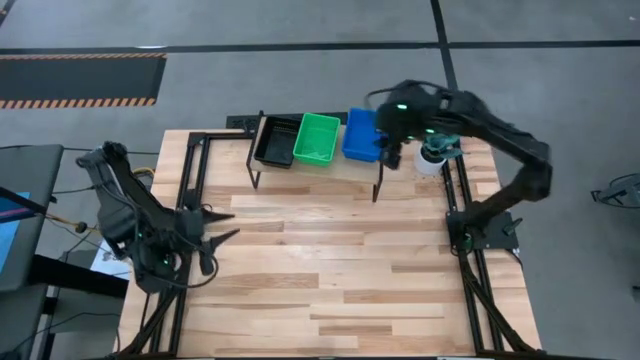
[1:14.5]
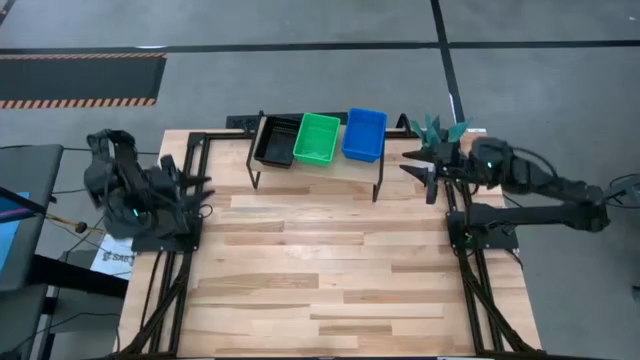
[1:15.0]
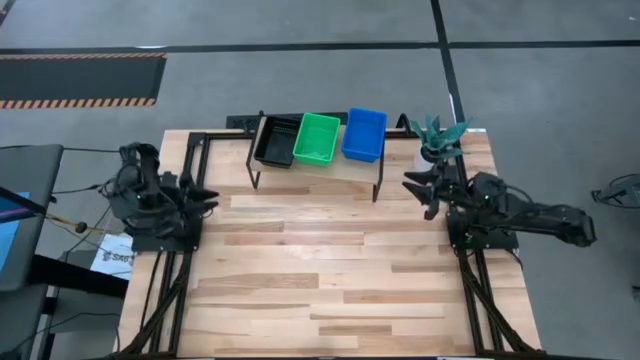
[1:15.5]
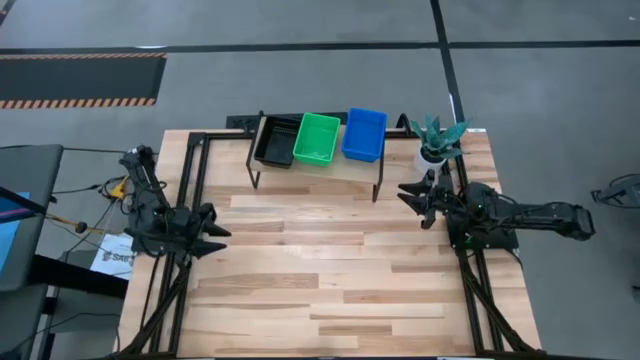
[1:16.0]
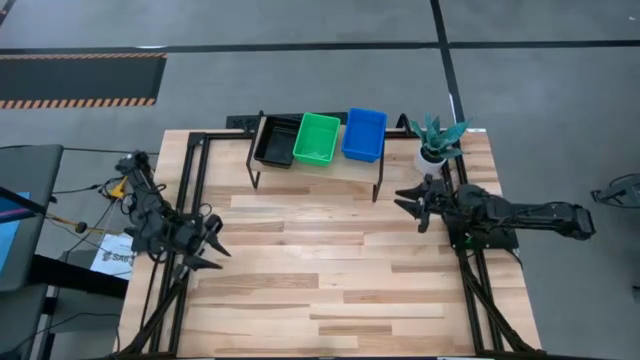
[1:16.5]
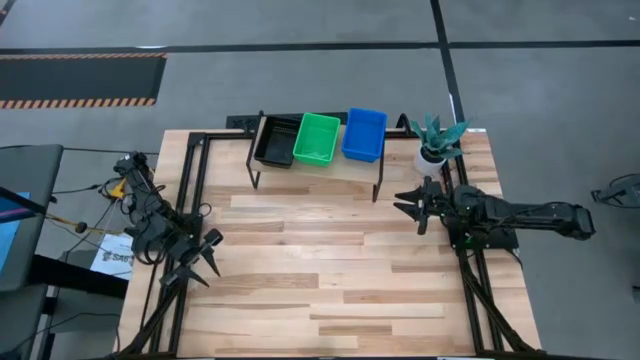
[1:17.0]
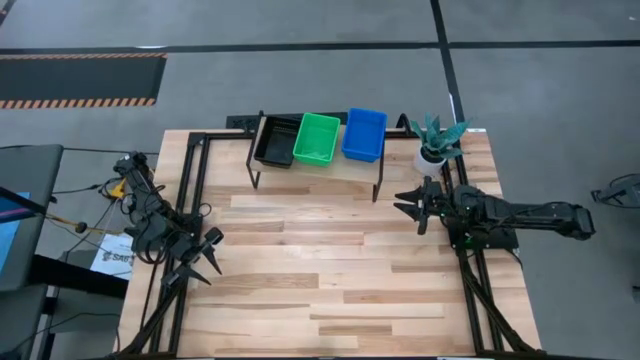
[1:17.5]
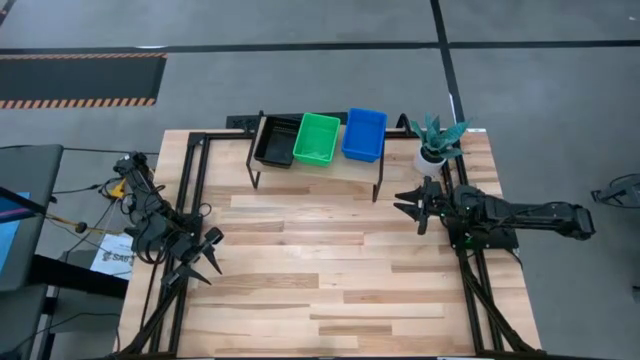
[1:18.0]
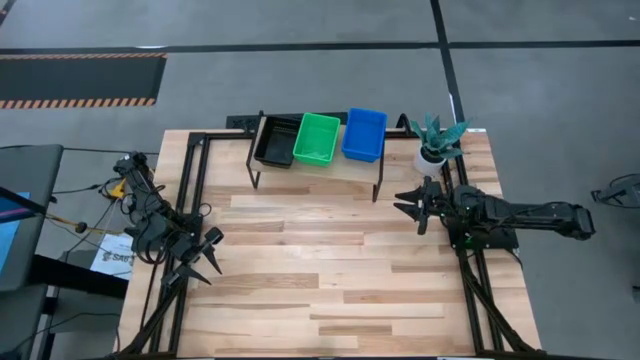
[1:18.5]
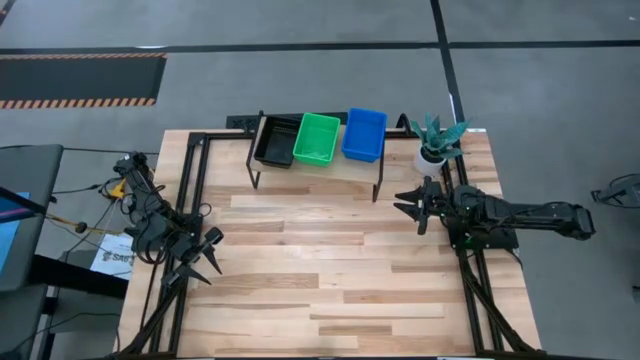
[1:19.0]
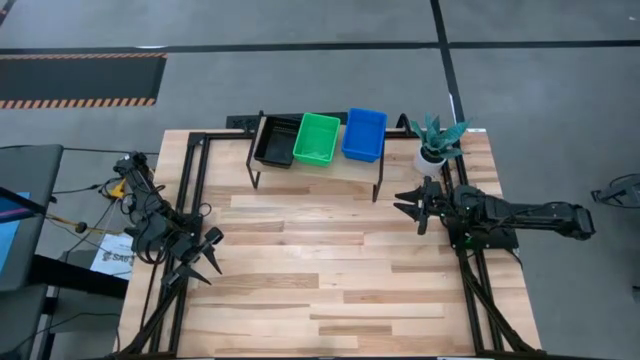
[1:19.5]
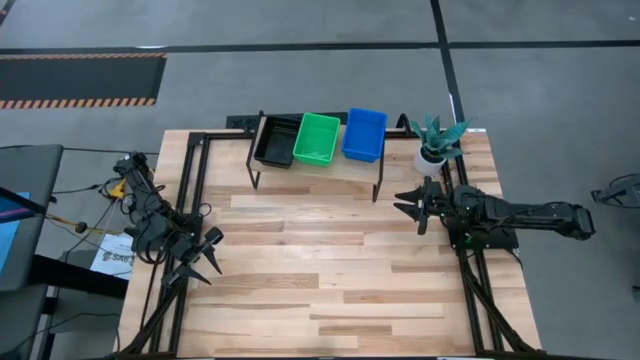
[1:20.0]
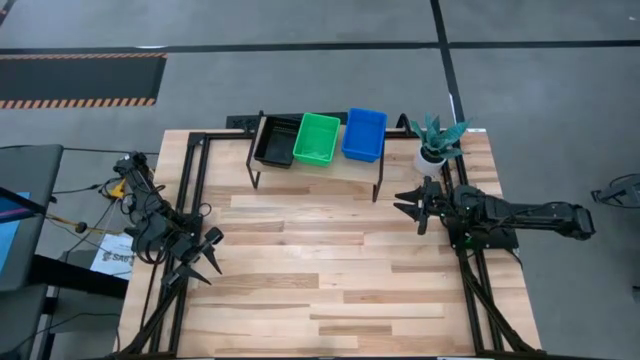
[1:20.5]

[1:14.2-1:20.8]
Task: Stack baskets on shelf by color
Return to Home Position

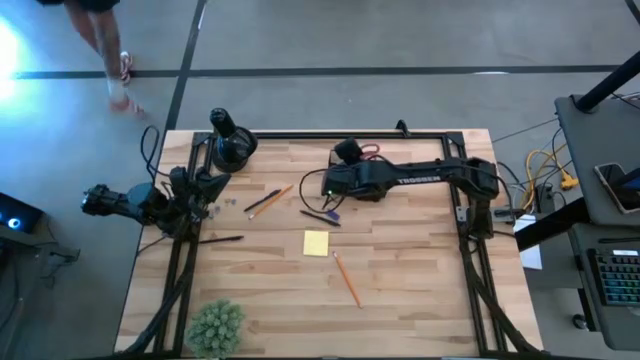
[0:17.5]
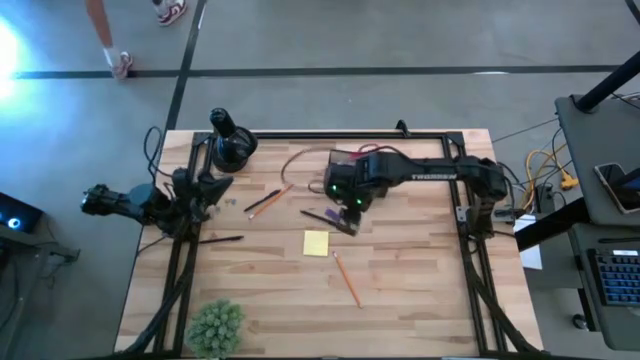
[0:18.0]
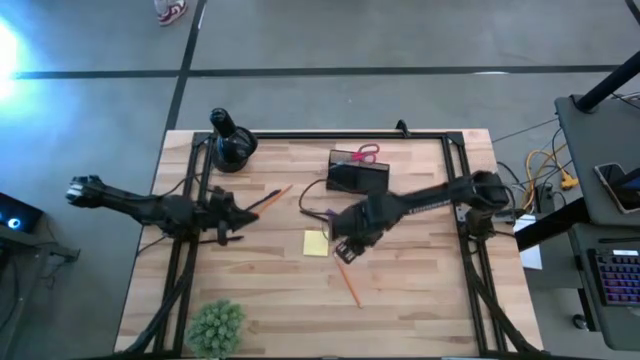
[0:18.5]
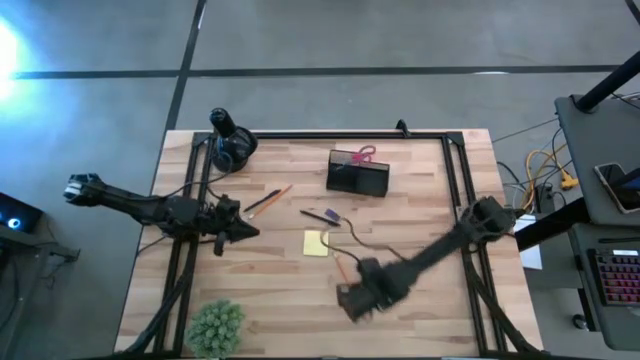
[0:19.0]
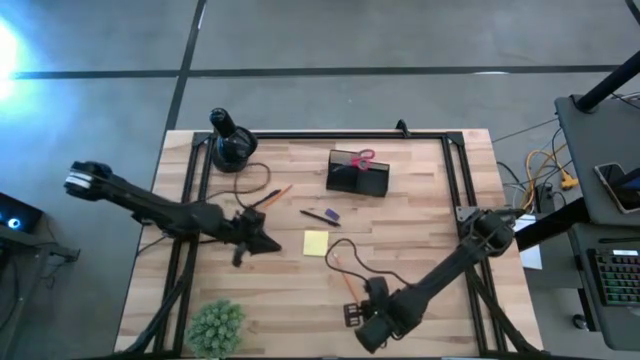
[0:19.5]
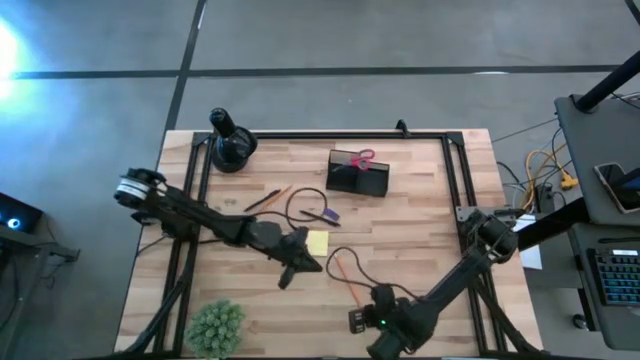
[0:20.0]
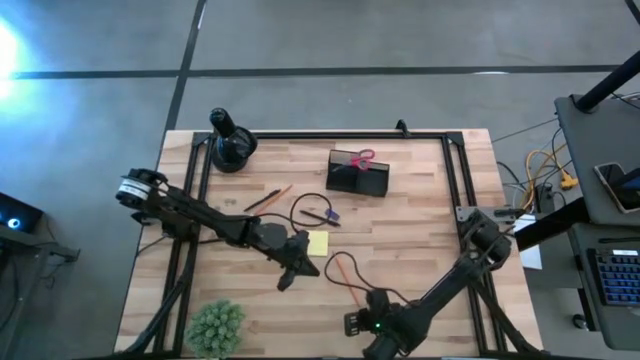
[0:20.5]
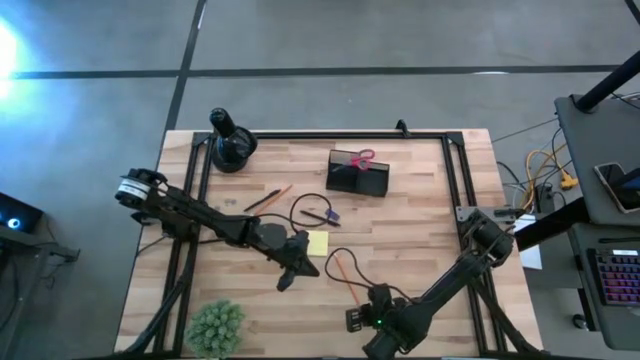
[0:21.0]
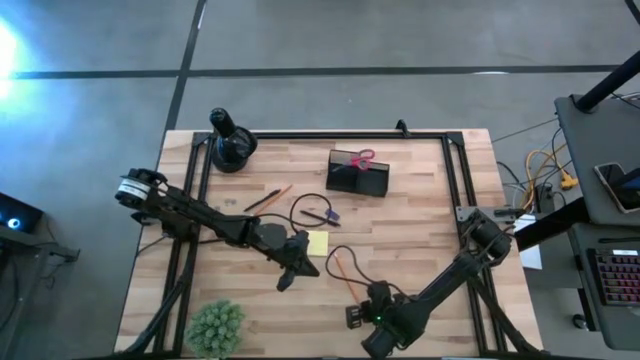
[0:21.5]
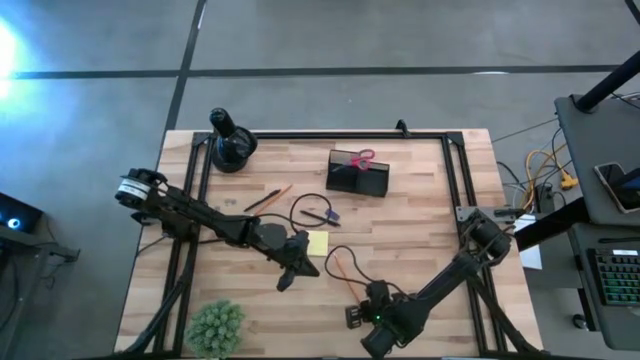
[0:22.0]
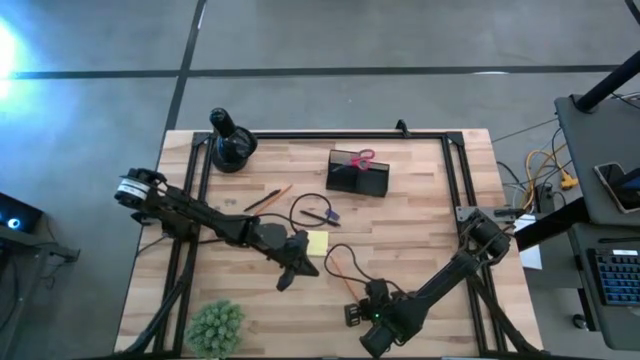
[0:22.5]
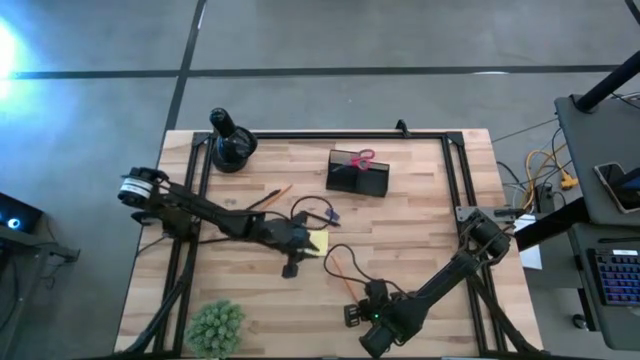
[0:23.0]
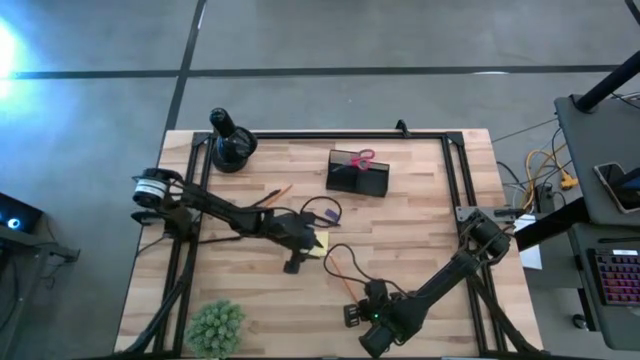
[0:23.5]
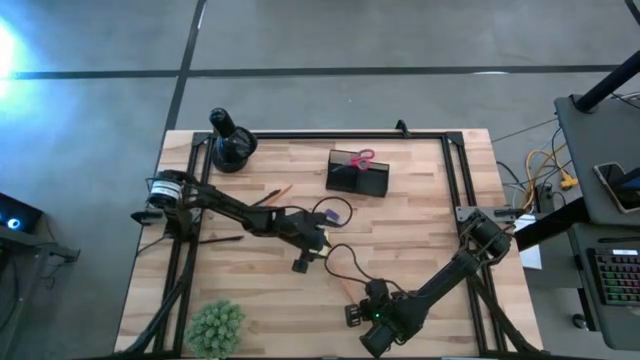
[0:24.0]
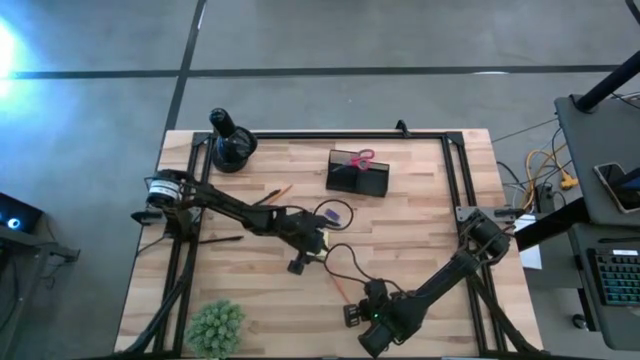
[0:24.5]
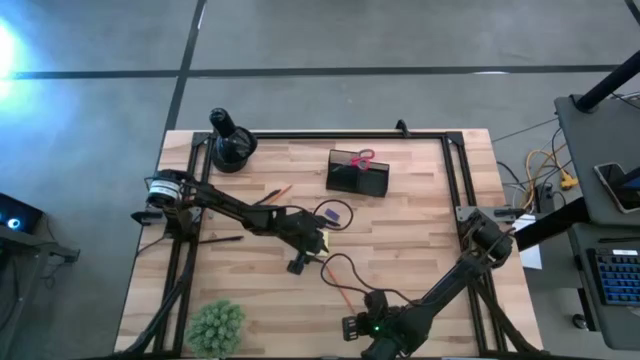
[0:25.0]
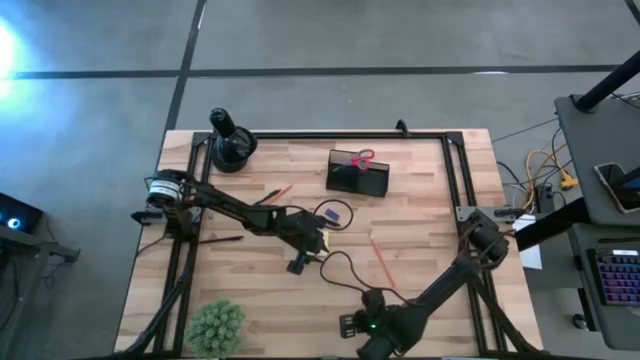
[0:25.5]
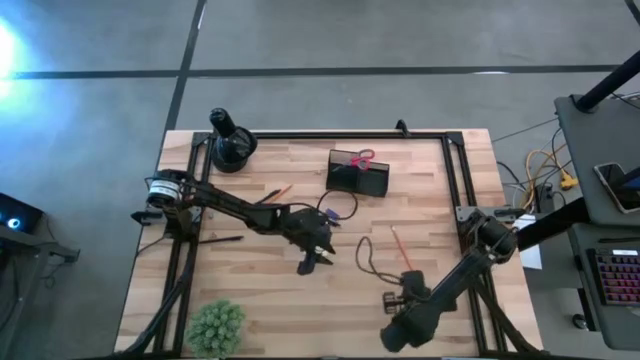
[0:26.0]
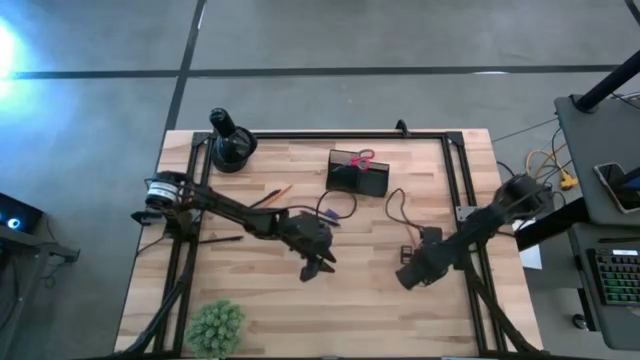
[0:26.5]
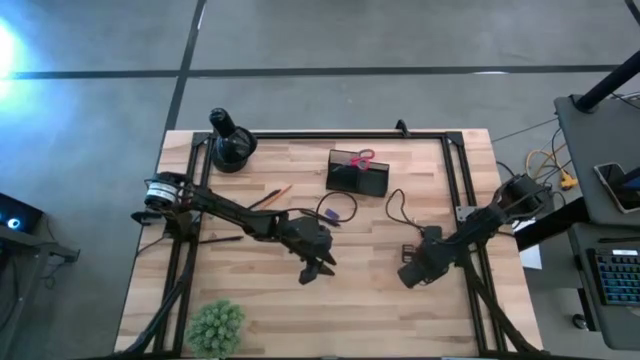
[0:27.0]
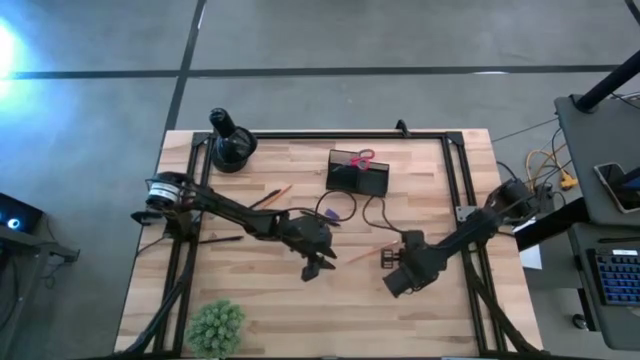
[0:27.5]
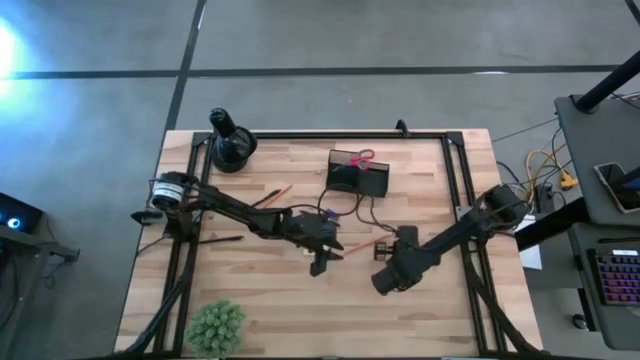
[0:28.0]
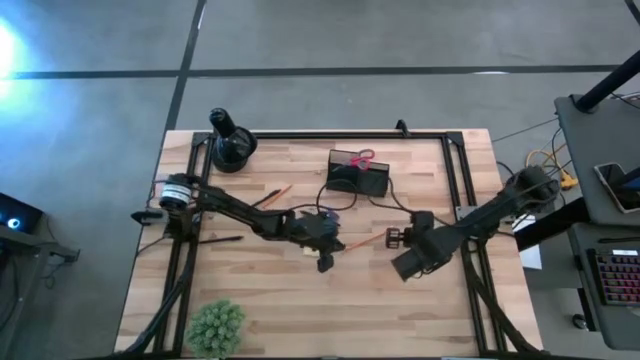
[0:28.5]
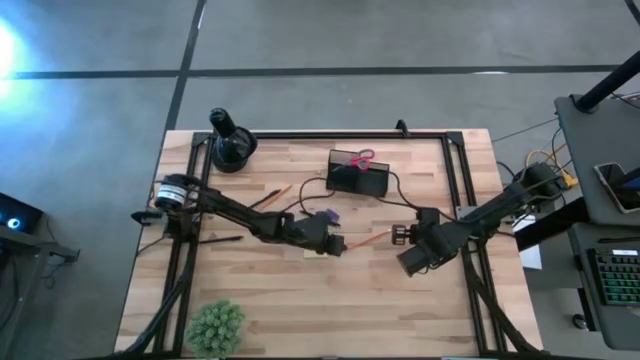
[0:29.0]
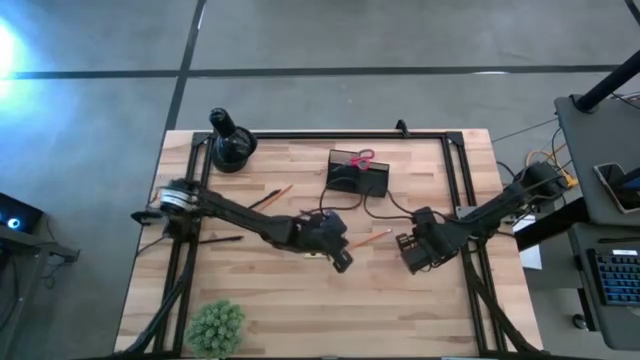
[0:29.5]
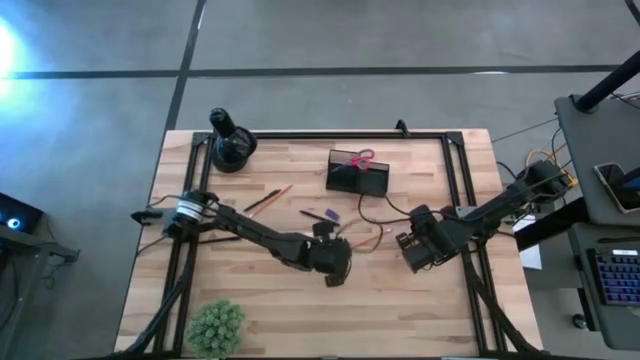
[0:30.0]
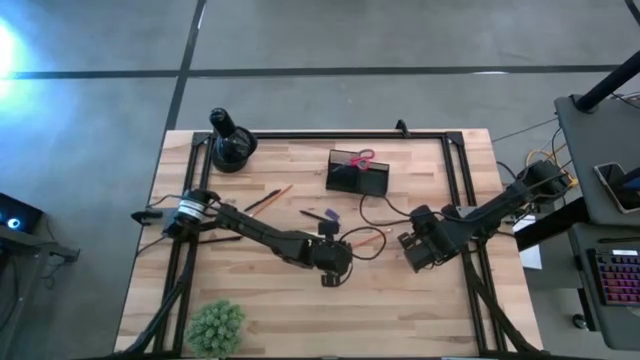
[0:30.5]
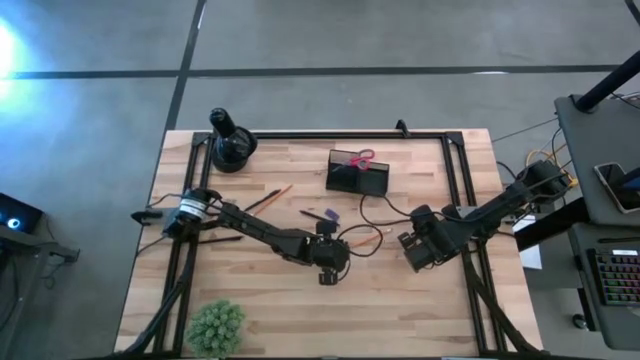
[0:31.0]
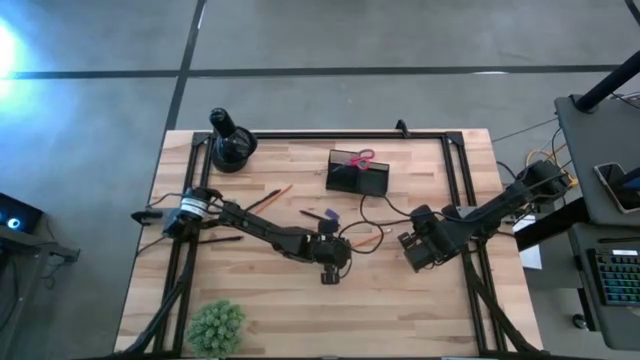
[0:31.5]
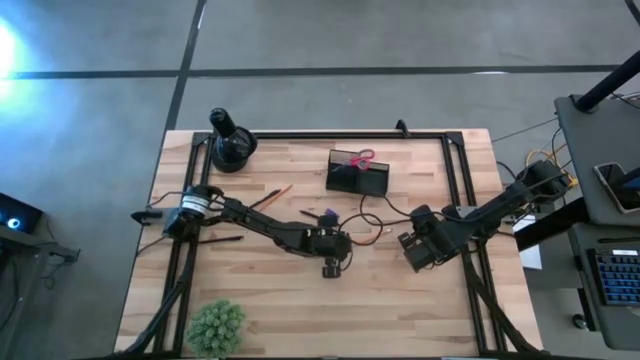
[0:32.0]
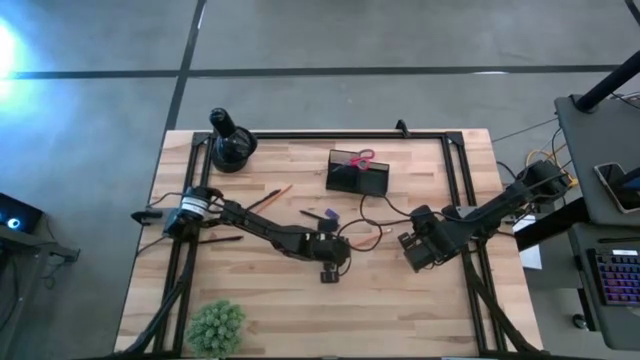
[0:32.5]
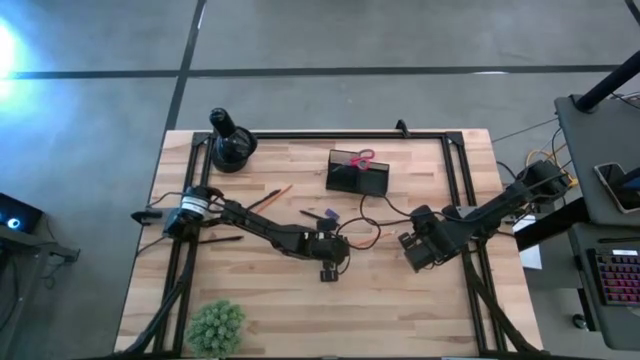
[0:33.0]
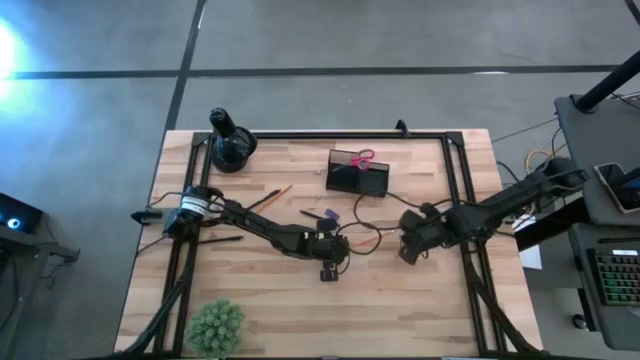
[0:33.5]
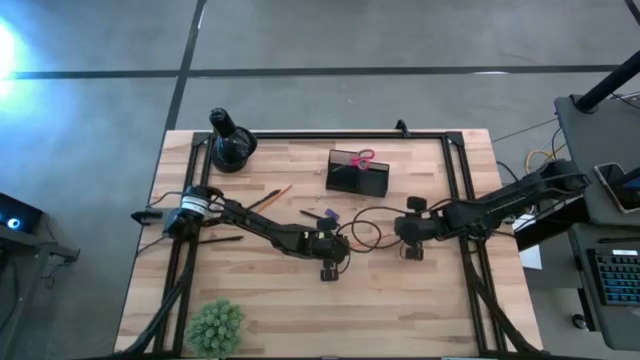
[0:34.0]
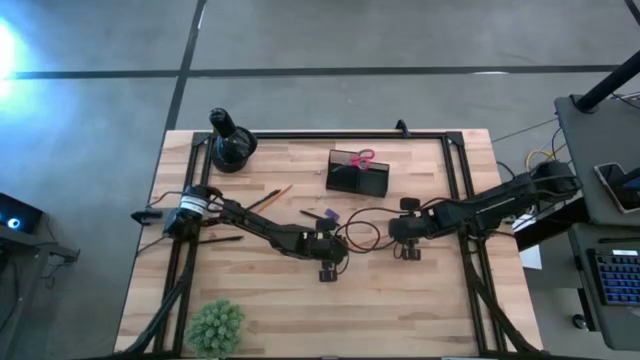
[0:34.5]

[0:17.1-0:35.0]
Task: Pick and place office supplies into organizer
Put the bottom pencil into the desk organizer
